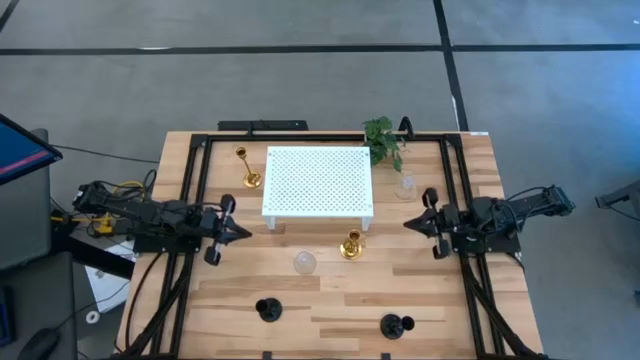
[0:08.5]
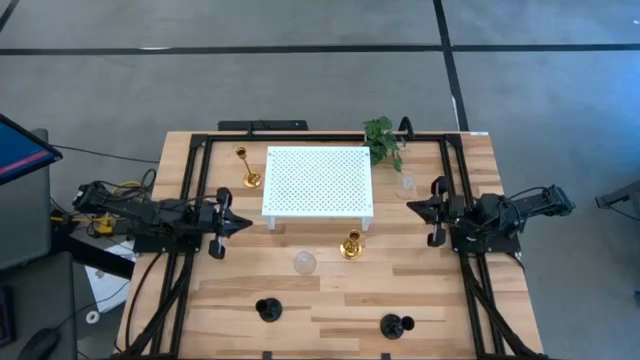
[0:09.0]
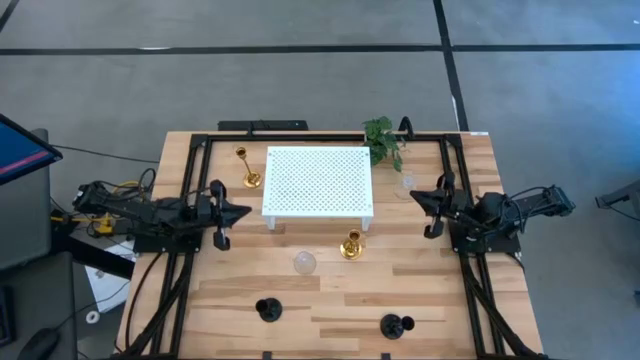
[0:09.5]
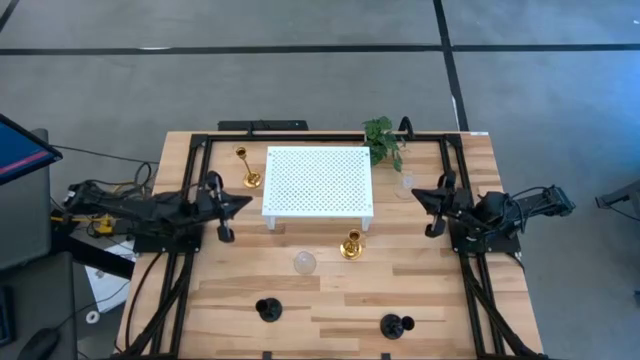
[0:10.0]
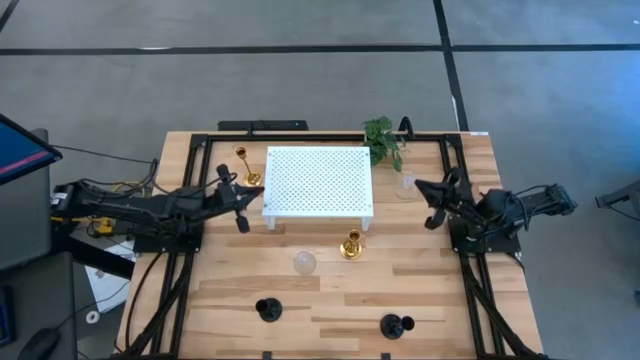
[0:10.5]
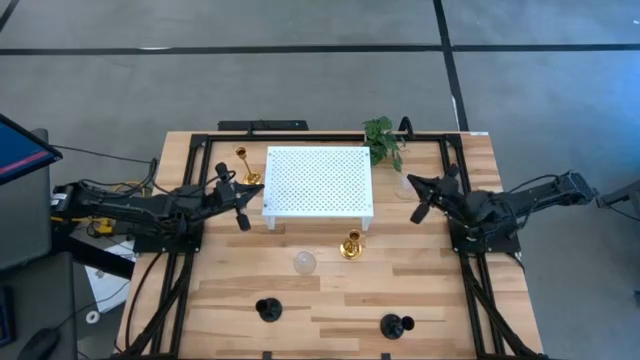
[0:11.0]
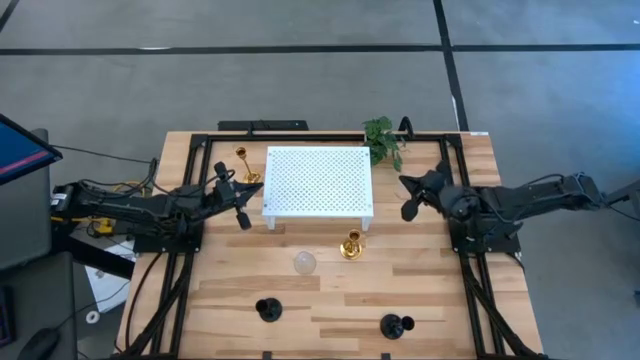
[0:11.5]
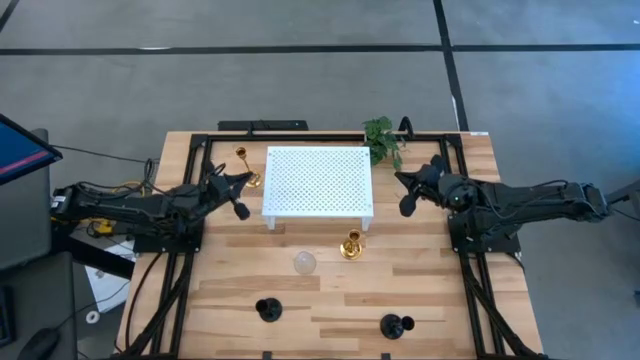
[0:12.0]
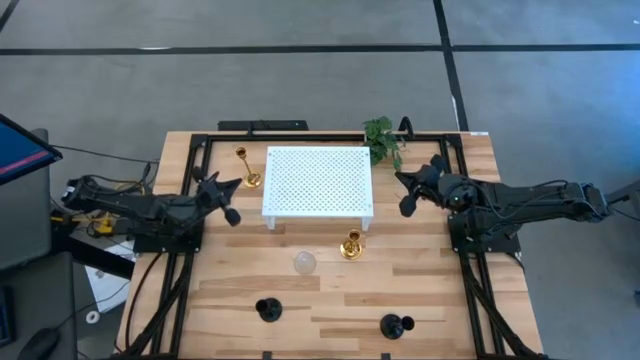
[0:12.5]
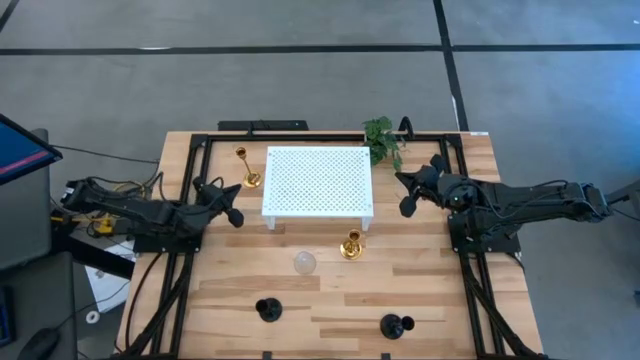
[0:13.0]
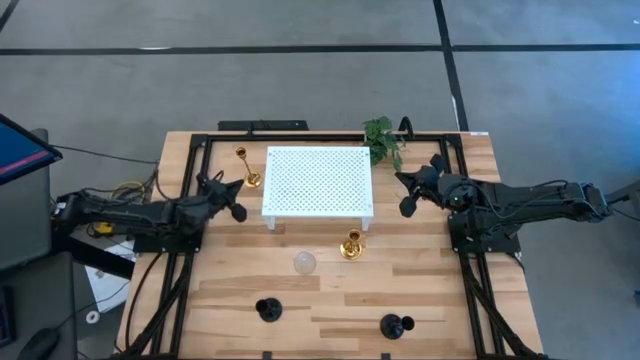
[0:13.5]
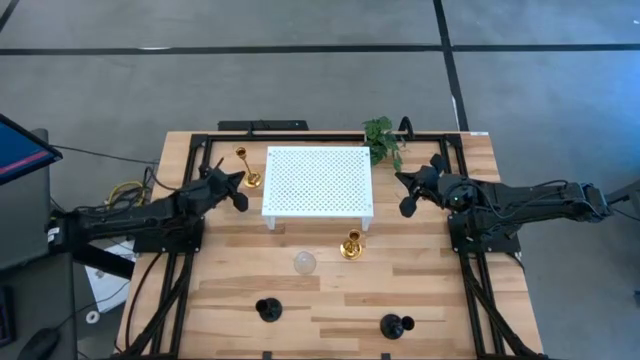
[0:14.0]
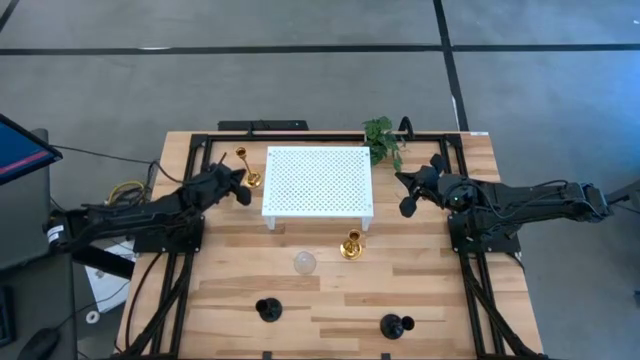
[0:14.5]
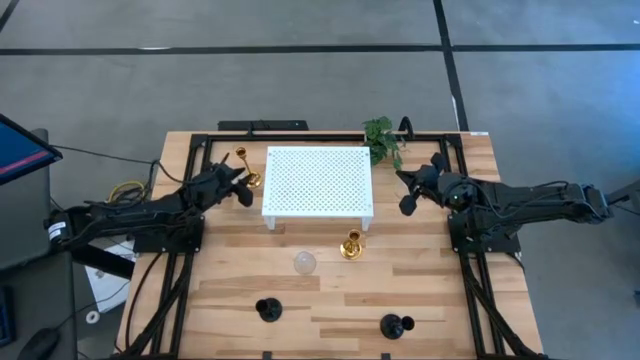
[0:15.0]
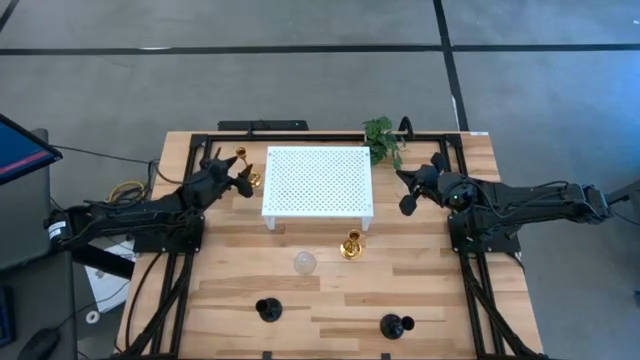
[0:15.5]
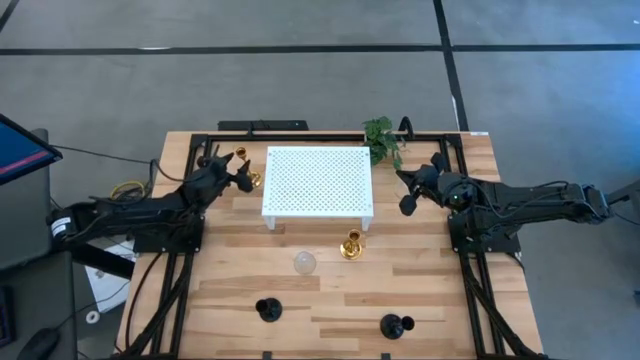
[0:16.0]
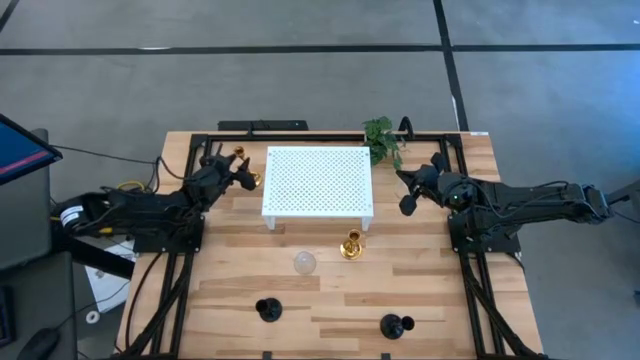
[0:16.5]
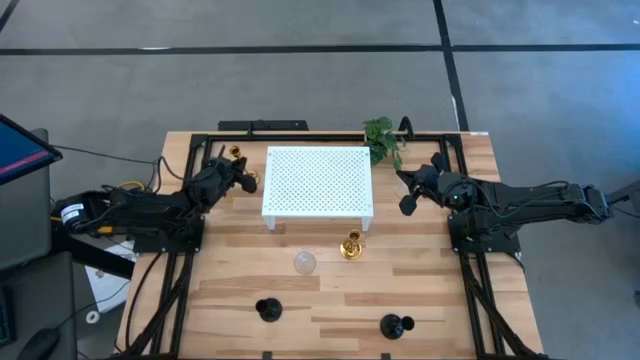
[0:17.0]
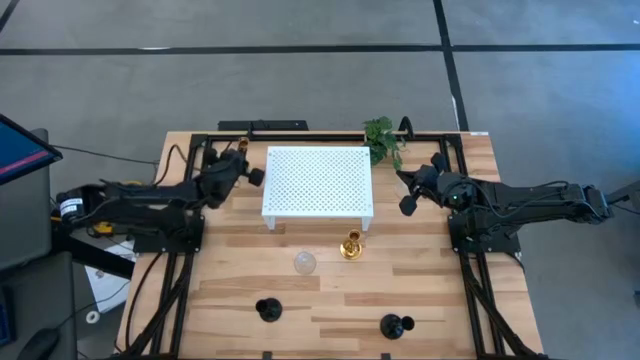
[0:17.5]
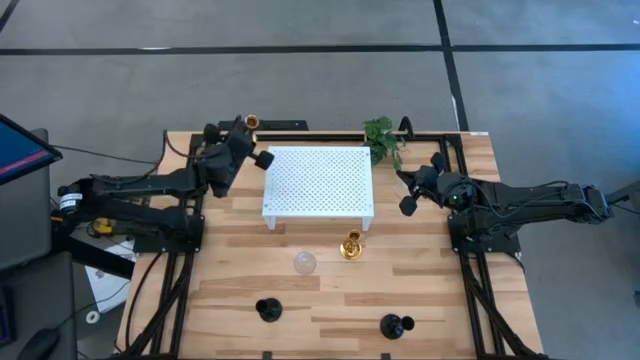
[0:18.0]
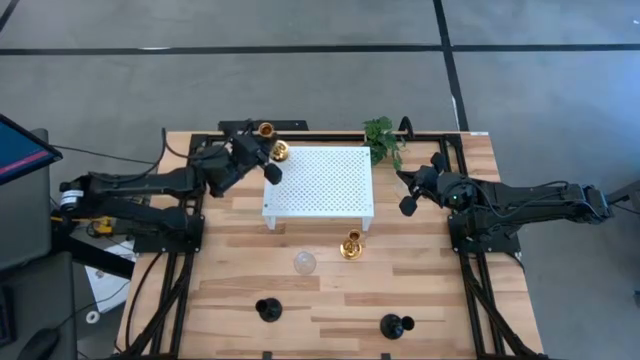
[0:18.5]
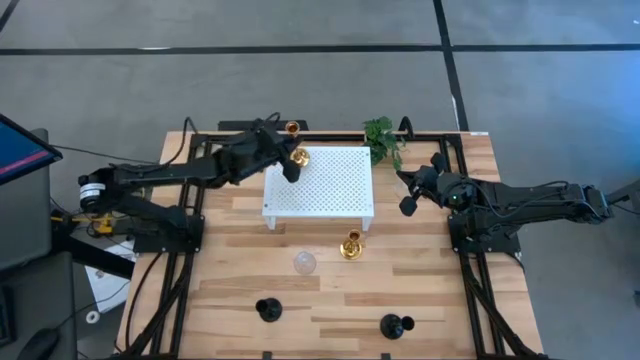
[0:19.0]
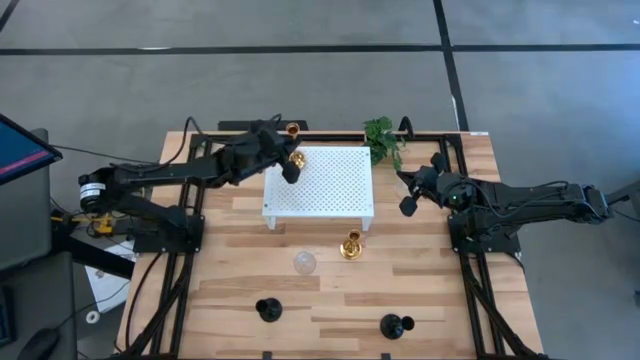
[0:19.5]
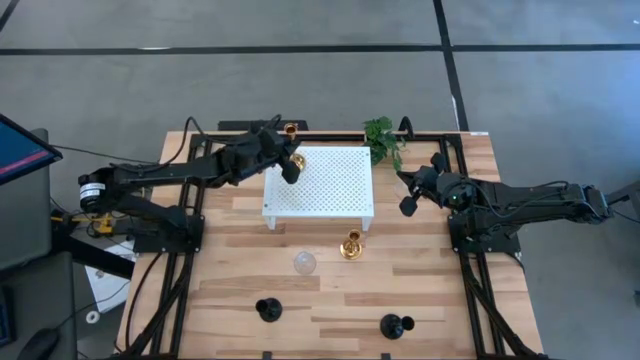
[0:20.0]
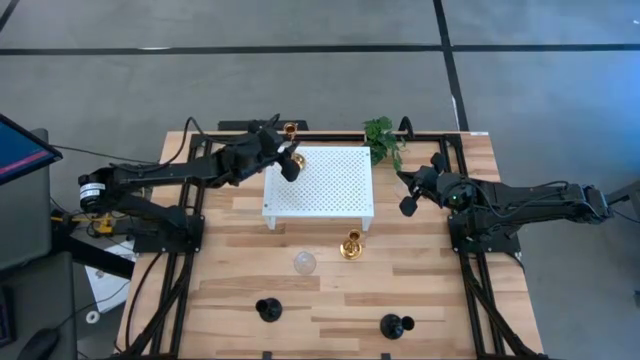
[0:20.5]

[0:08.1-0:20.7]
Task: Pick & Place candle stick holders
Put the top gold candle holder on the shelf

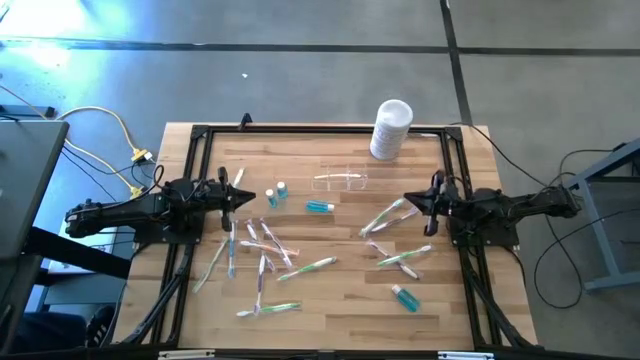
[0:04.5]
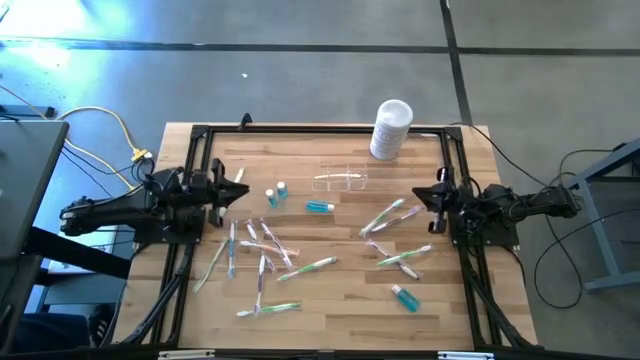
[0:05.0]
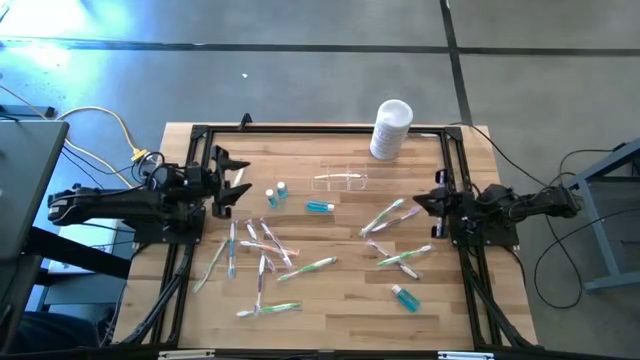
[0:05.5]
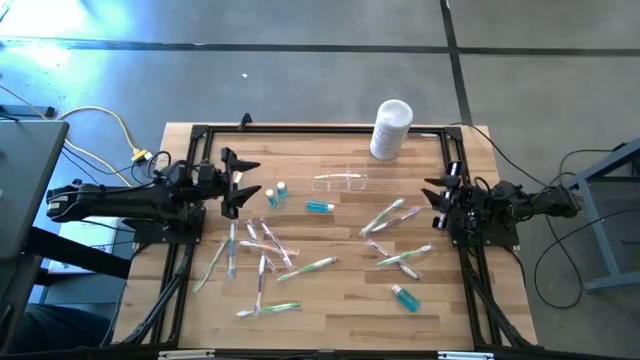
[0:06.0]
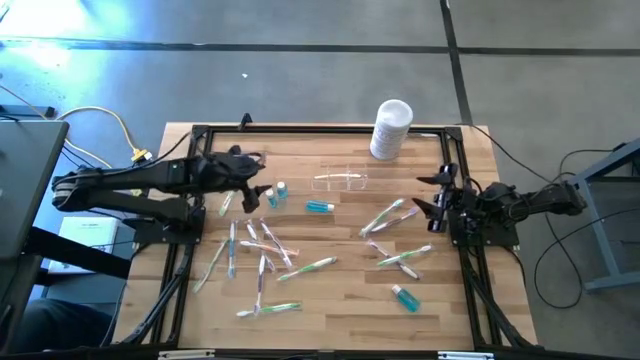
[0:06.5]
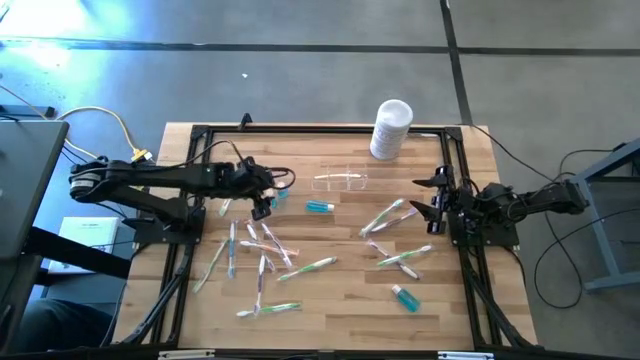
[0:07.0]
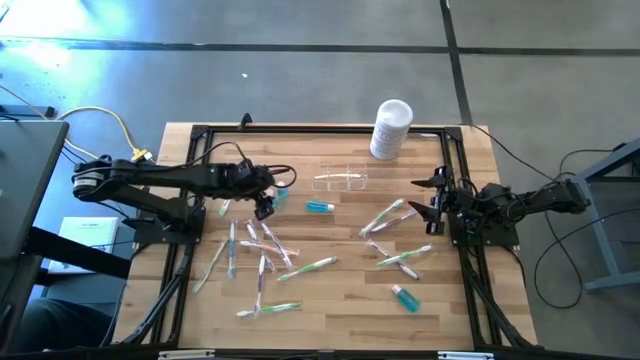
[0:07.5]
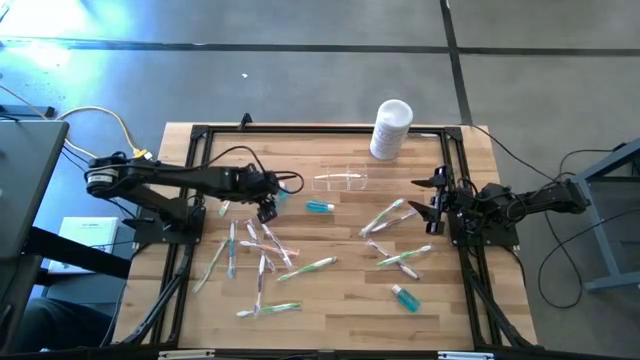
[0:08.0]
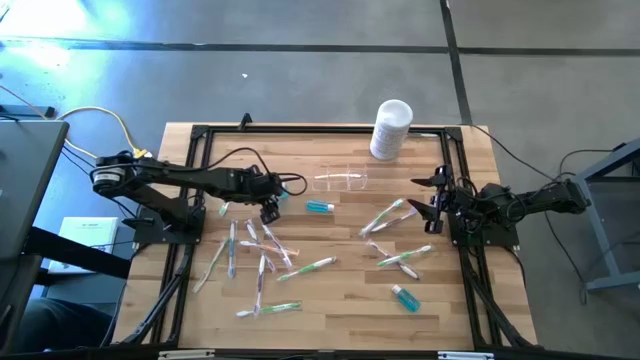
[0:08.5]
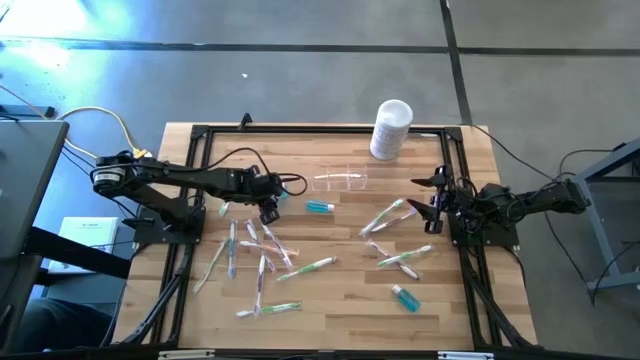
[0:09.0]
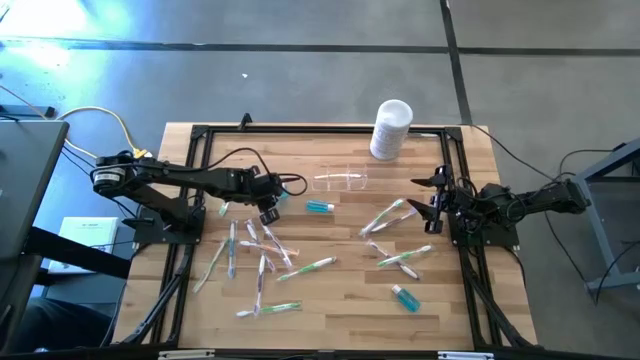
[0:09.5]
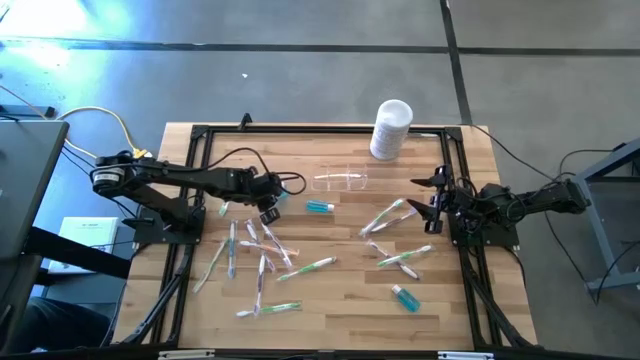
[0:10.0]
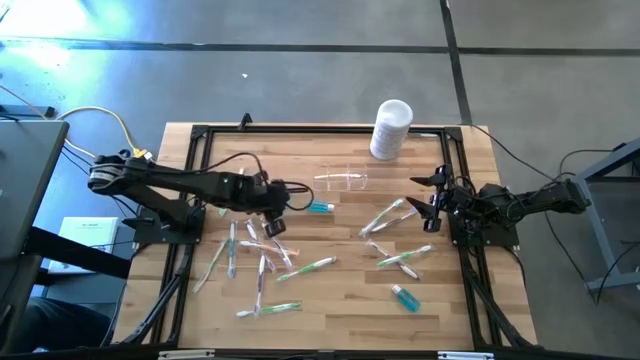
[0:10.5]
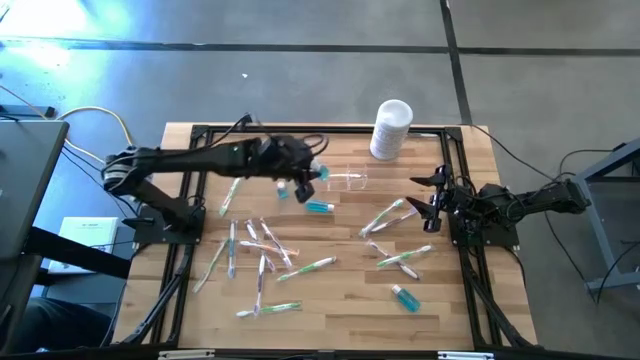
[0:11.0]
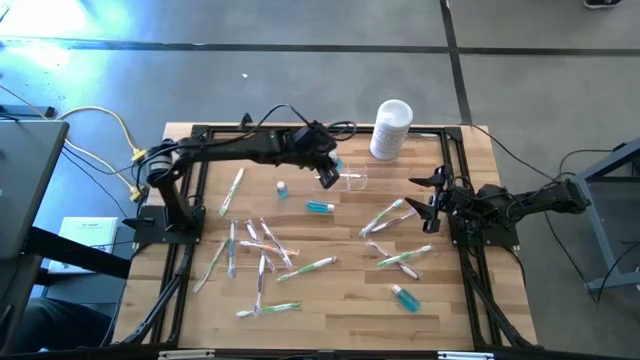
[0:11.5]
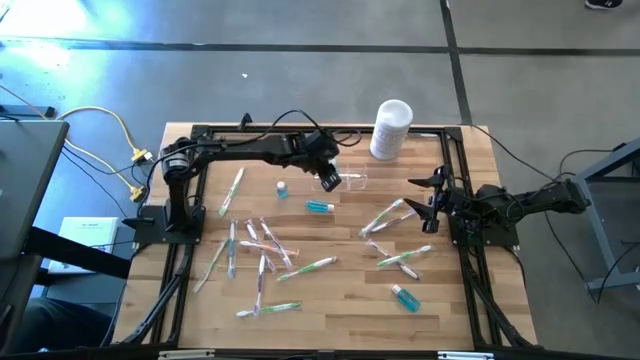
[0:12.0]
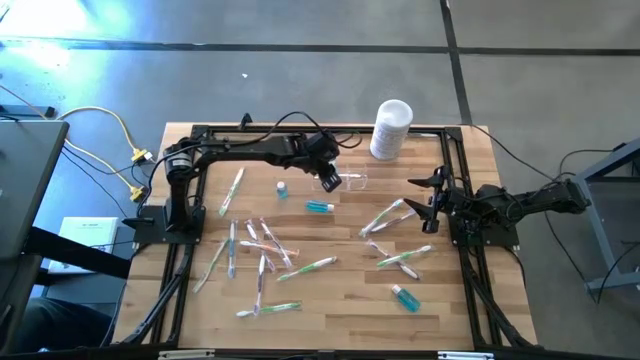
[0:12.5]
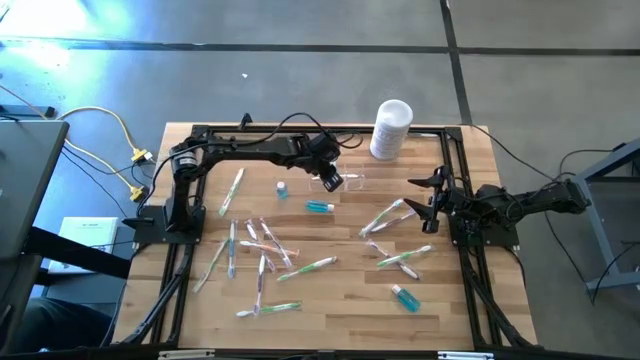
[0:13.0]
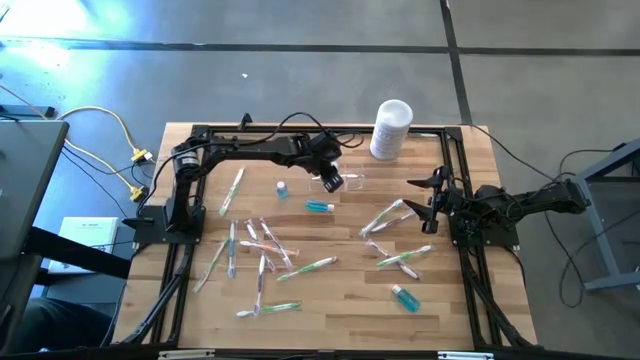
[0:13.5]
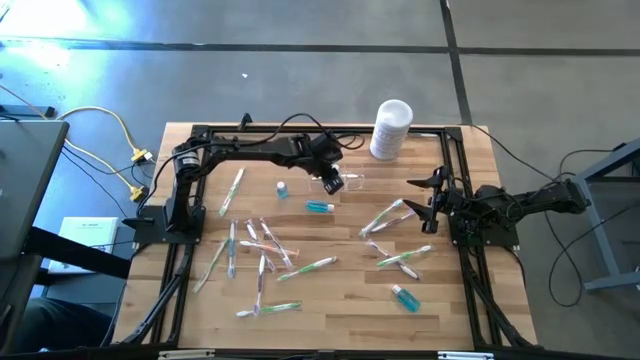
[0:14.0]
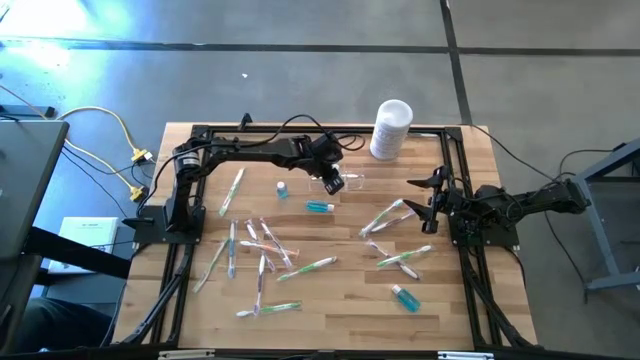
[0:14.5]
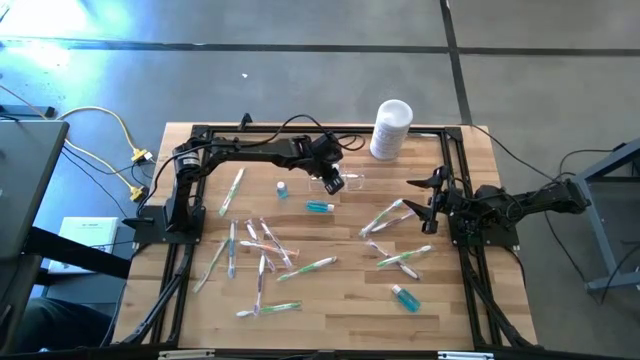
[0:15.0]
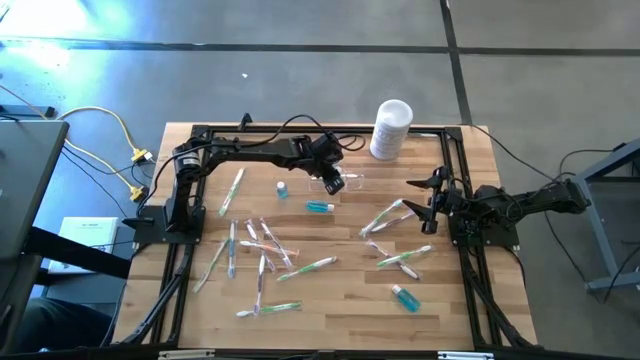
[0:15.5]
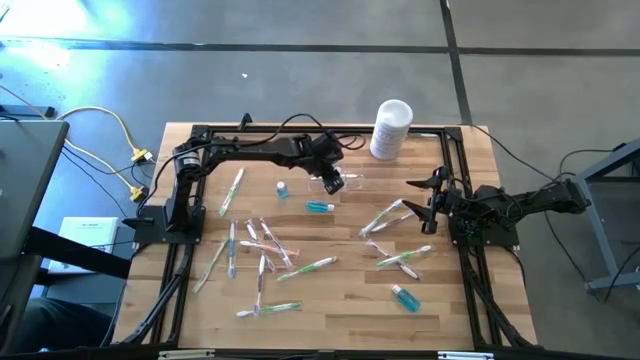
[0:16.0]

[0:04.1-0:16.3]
Task: Pick & Place toothbrushing station
Put the blue mouthwash into the transparent organizer
